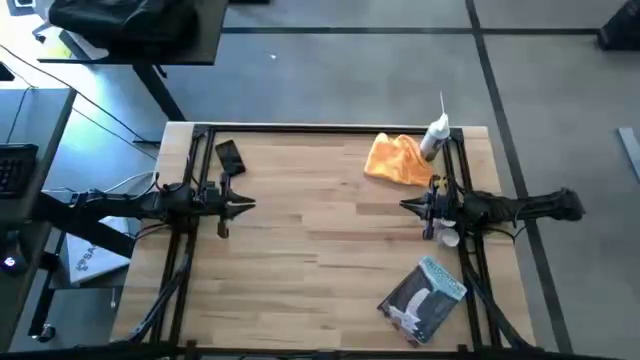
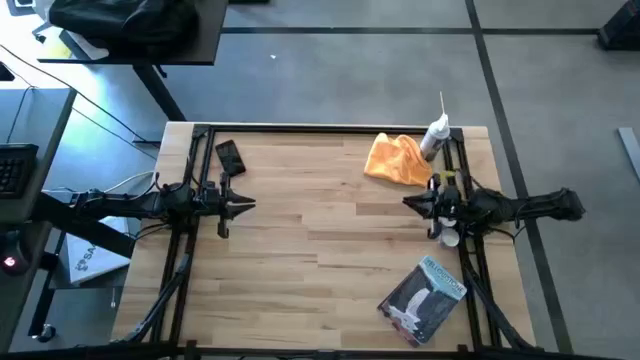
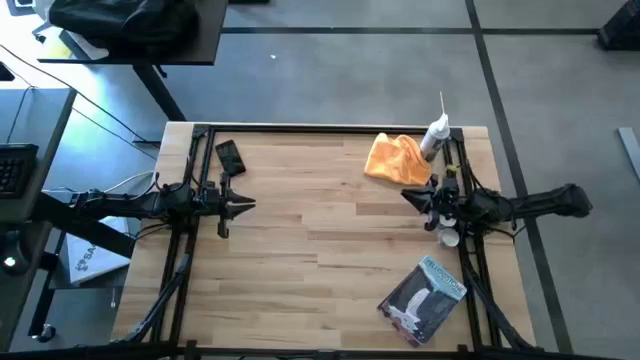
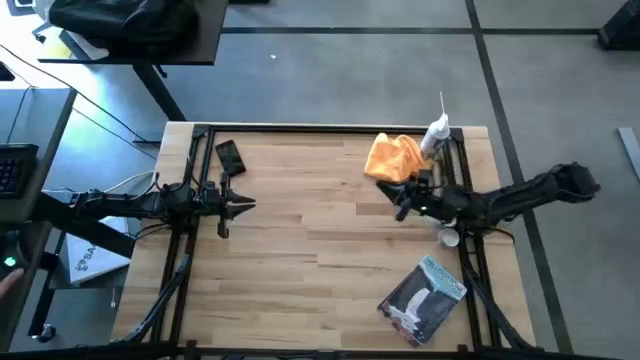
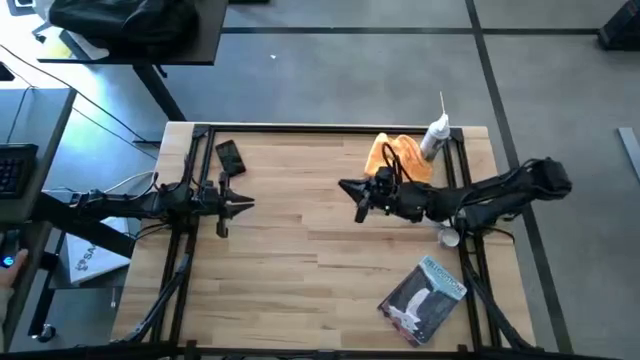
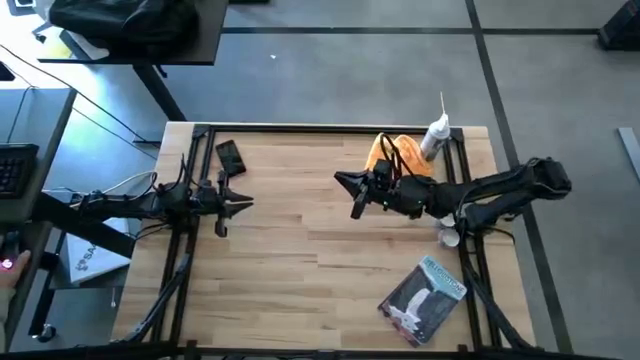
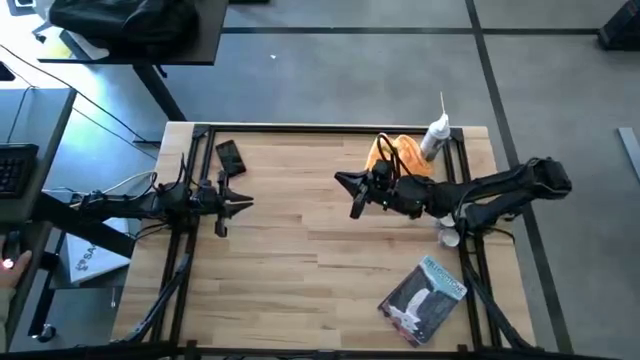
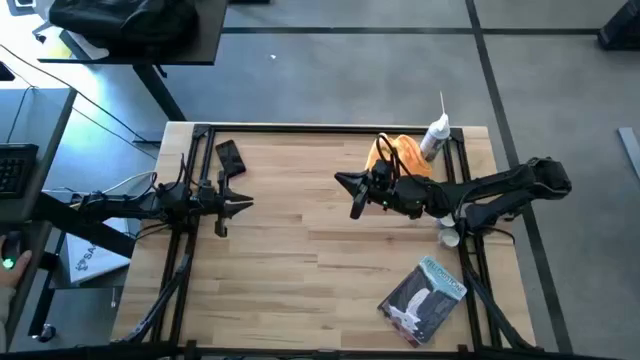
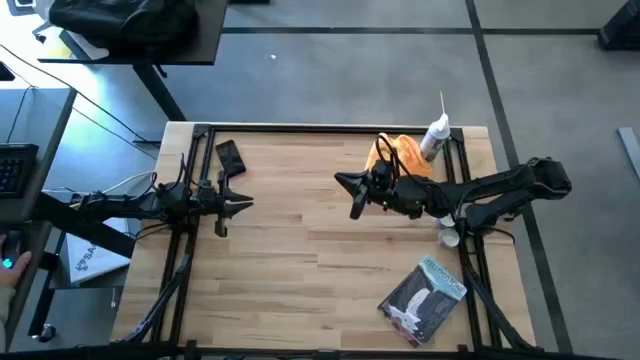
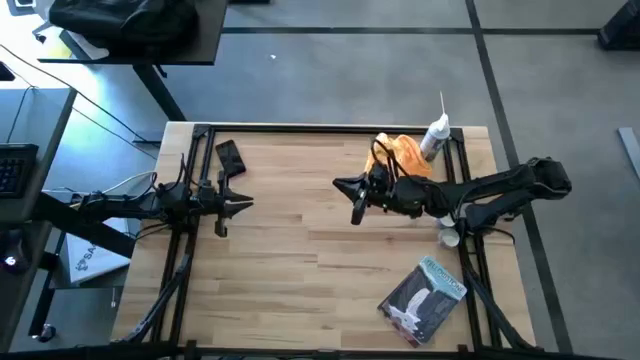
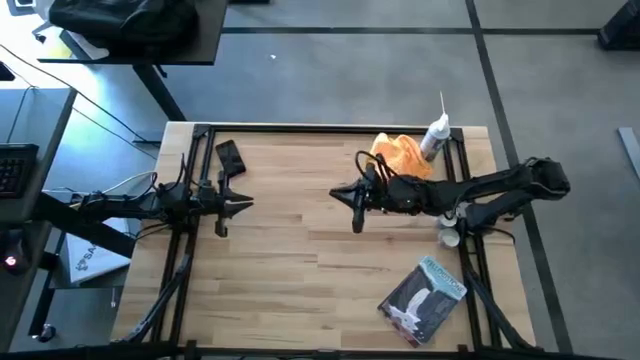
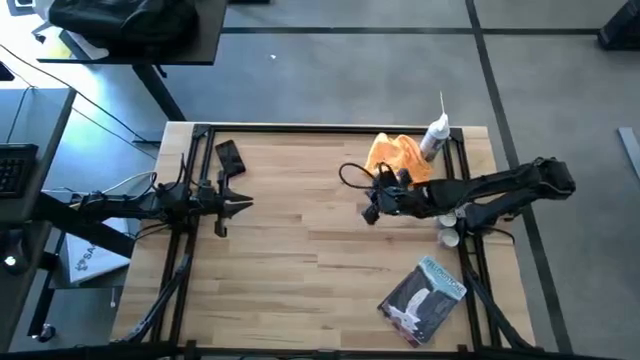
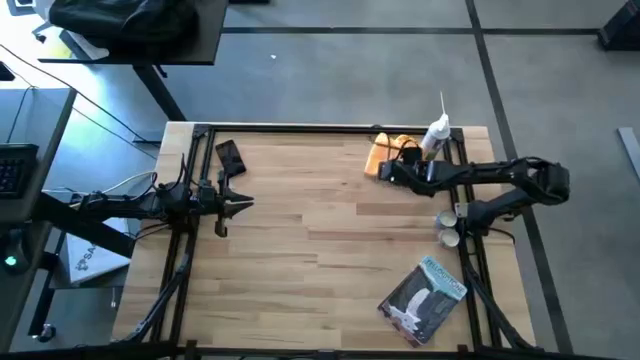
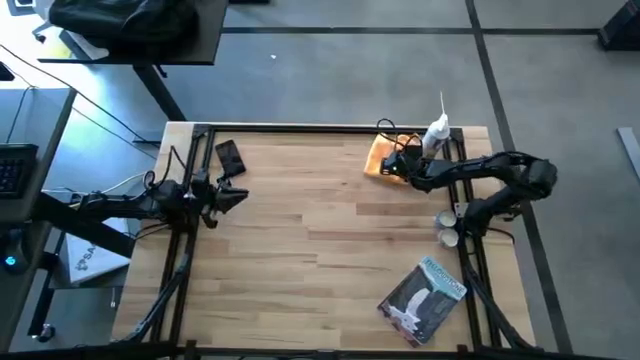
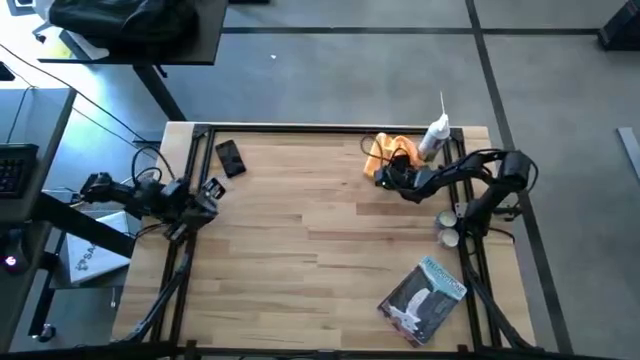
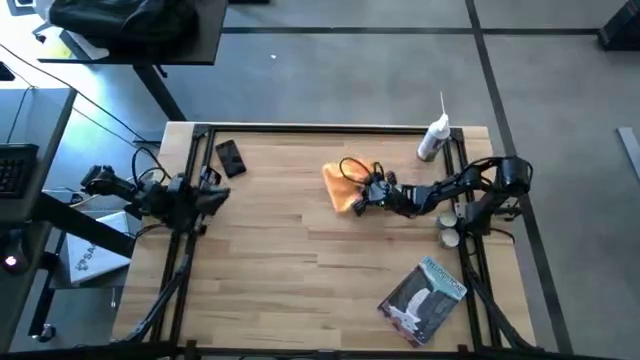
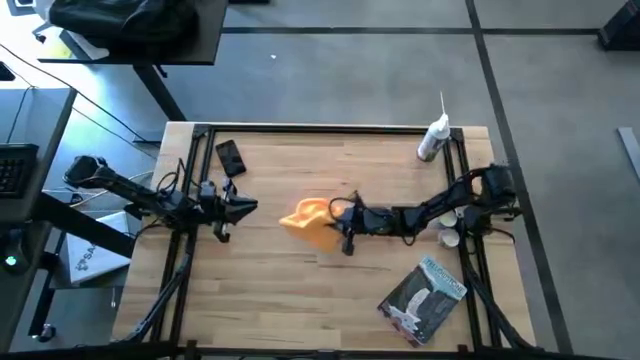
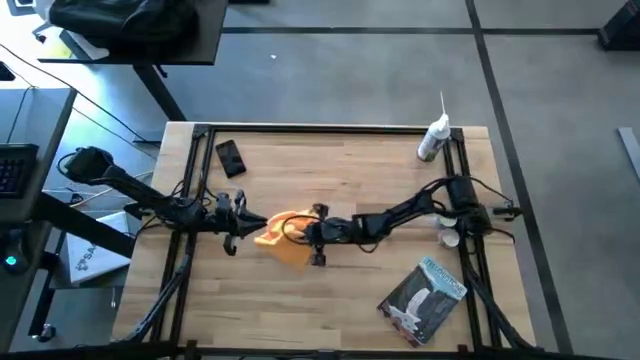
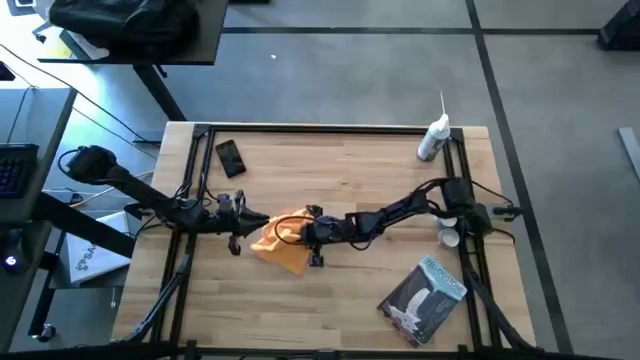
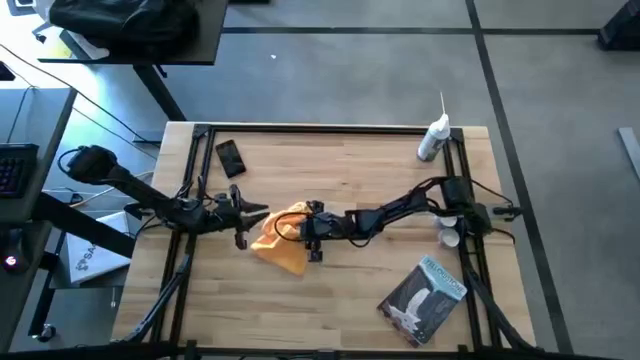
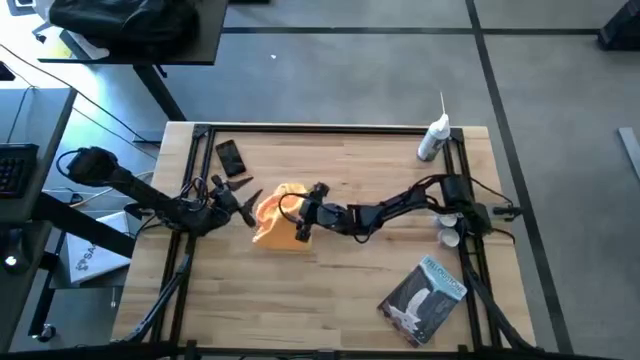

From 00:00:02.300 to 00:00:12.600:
Task: Apply microfiber cloth
Prepare the microfiber towel

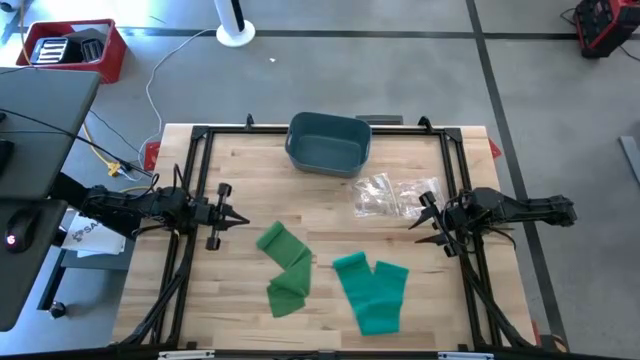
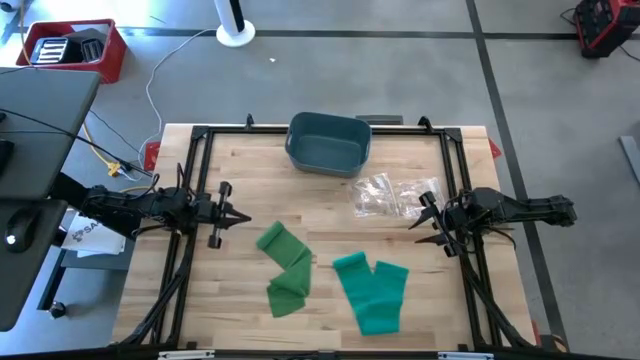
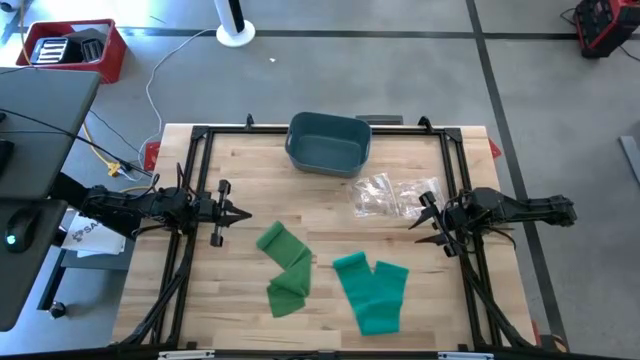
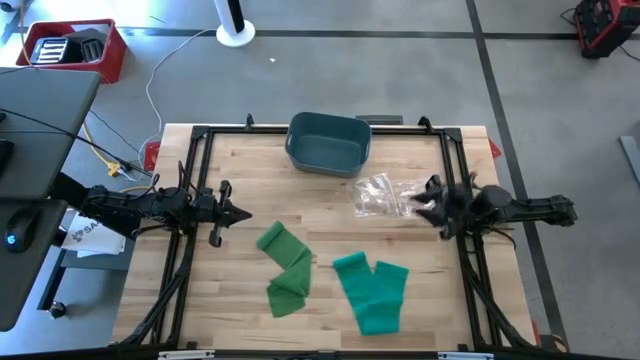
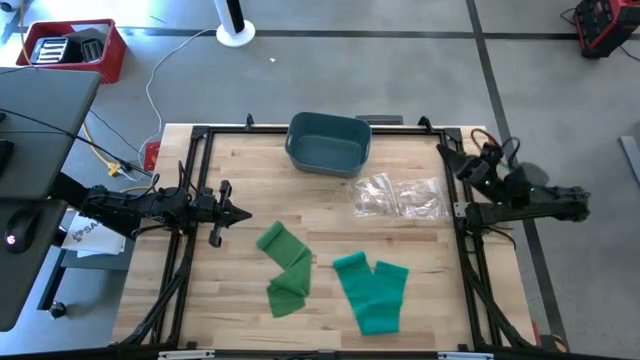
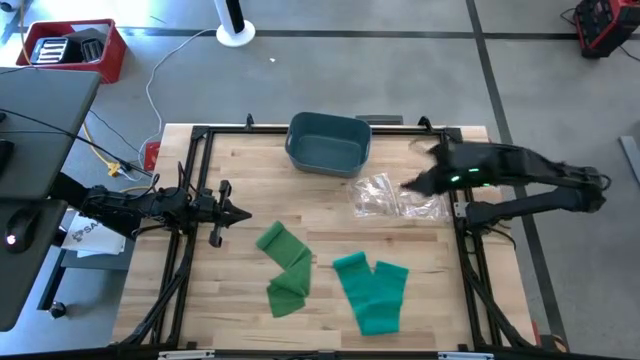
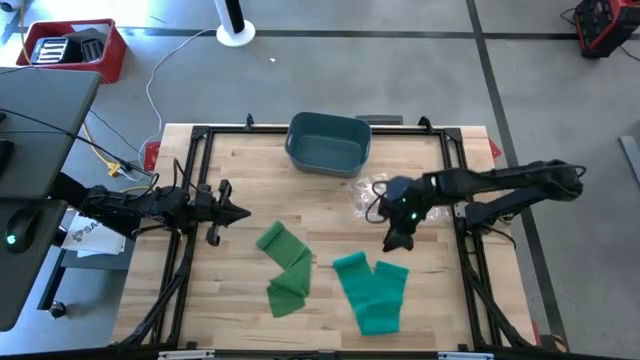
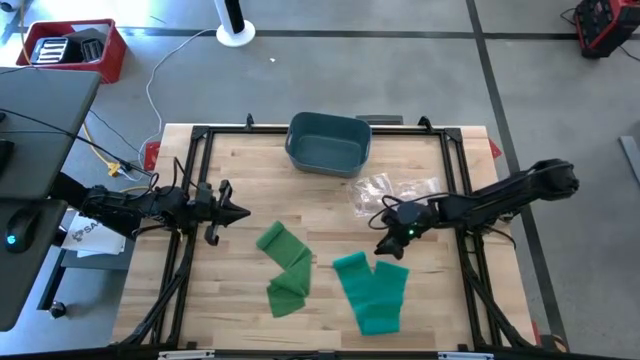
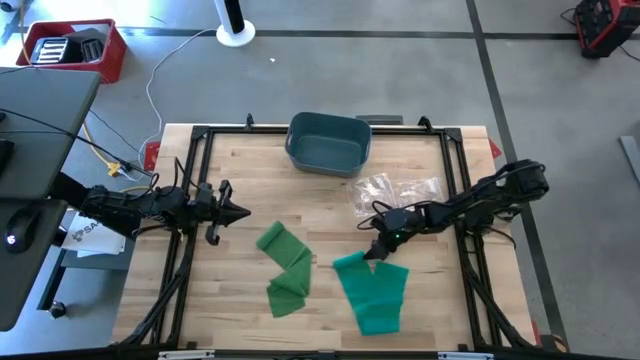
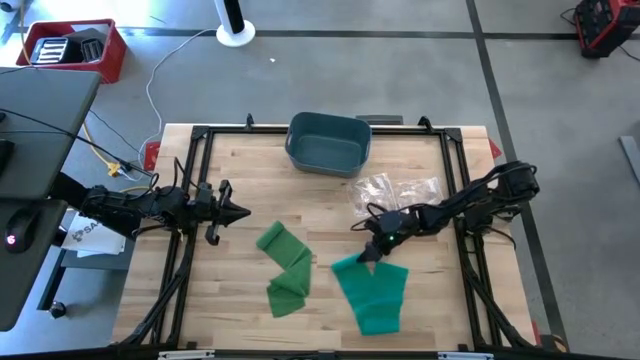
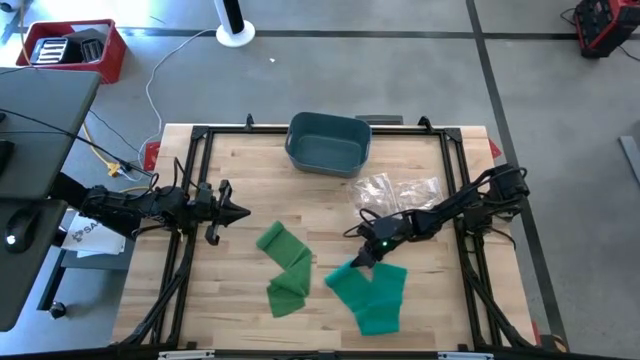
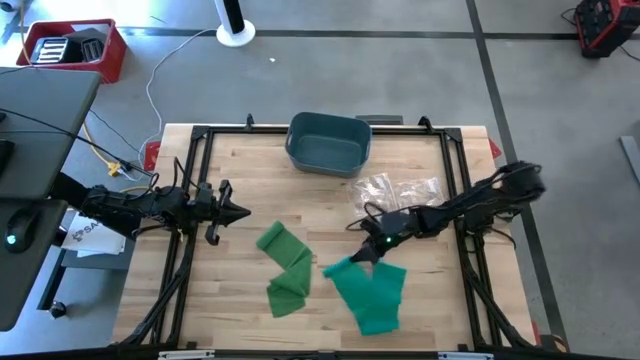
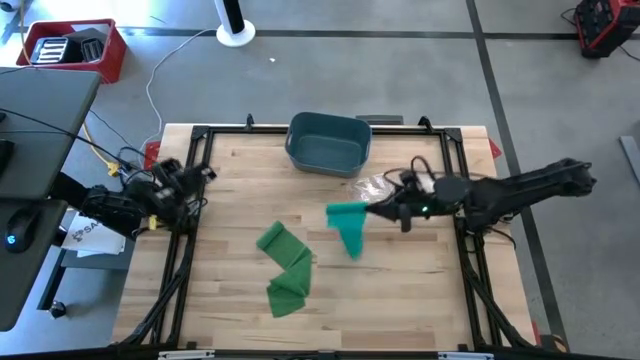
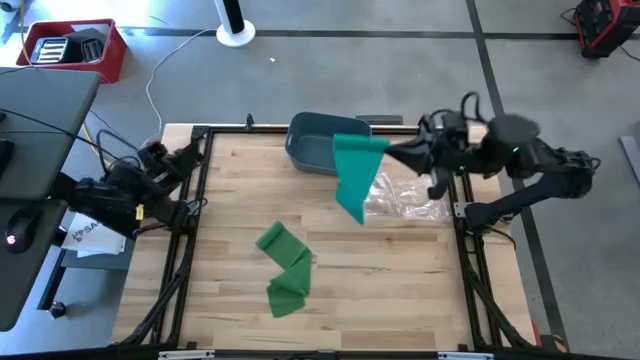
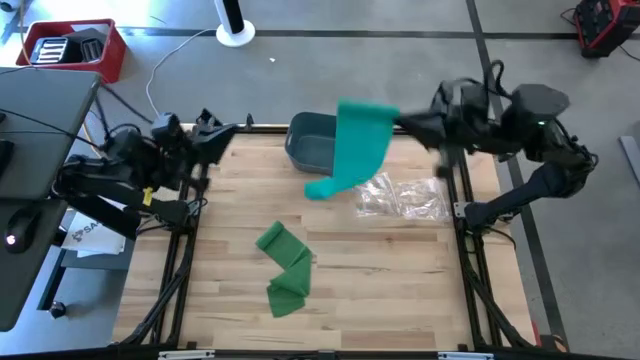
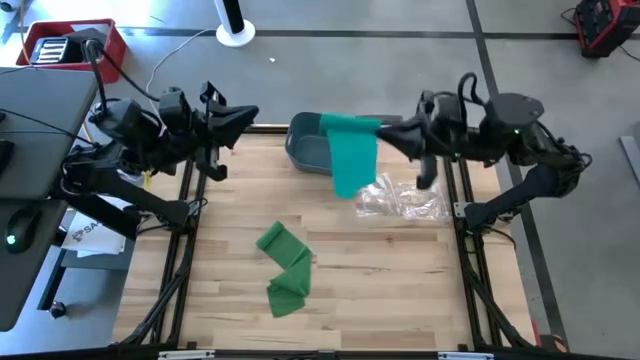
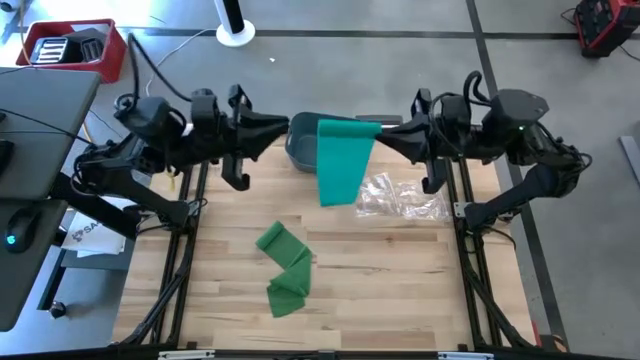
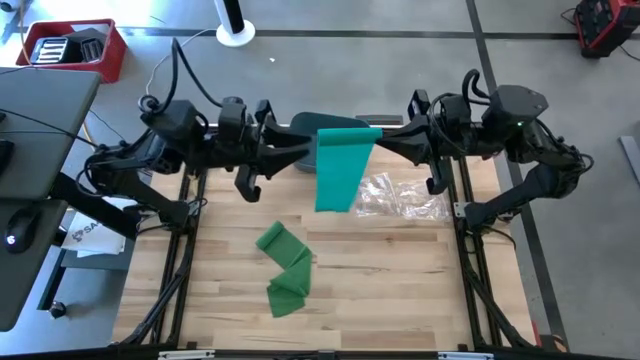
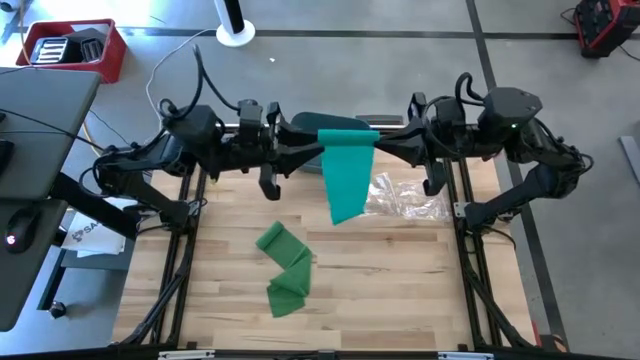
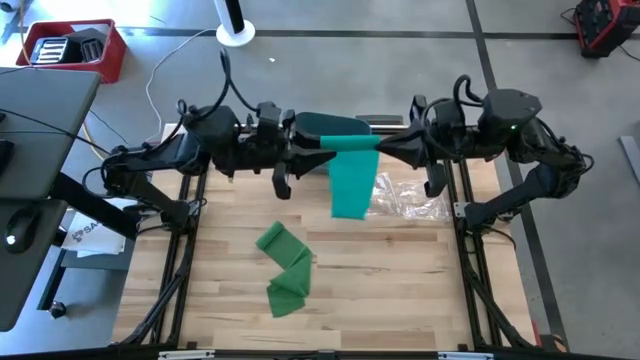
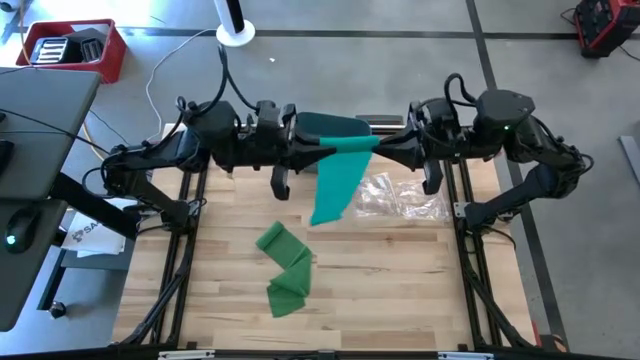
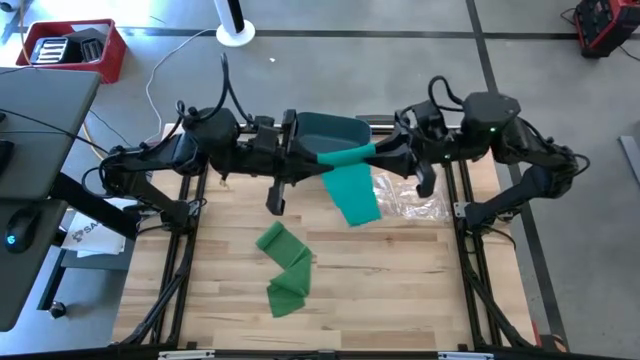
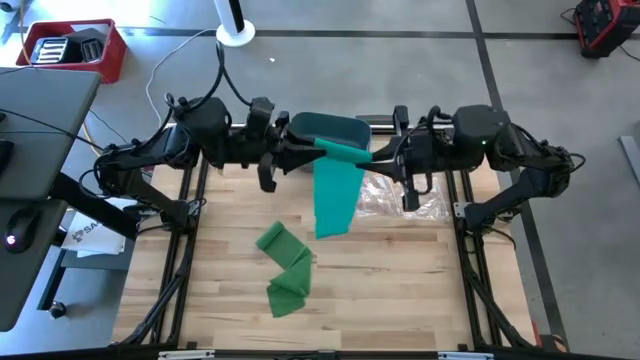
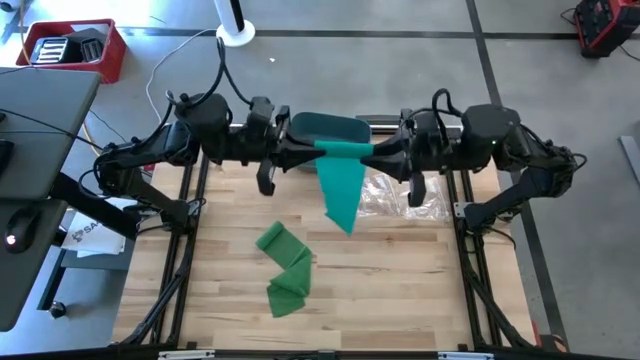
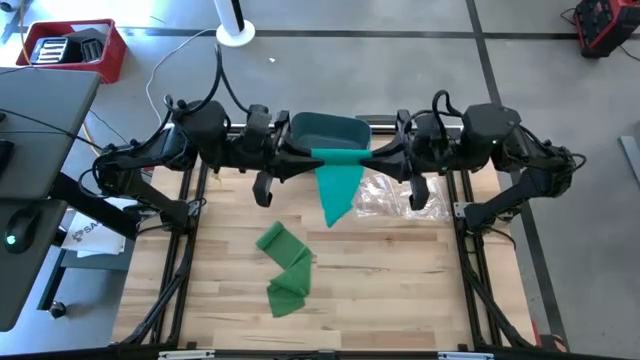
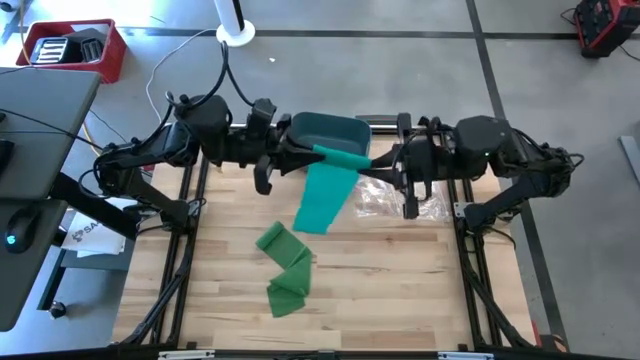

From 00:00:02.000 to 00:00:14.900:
Task: Roll bandage
Roll the blue bandage
